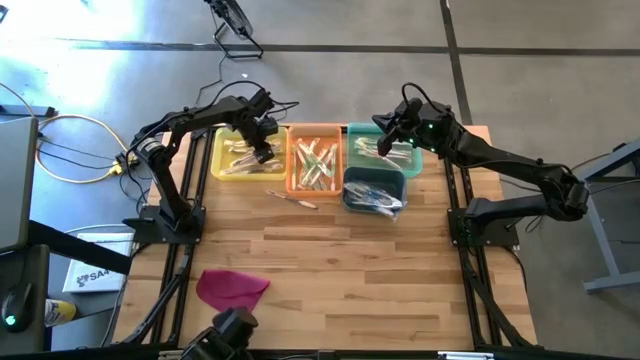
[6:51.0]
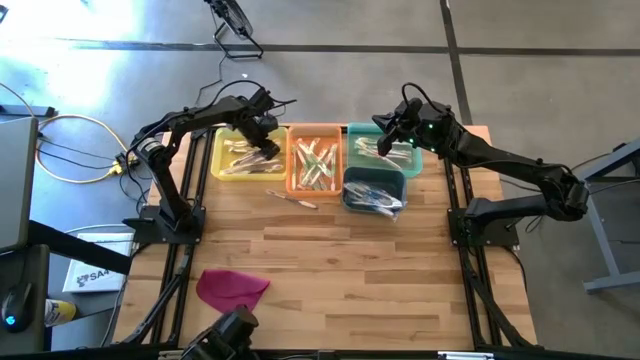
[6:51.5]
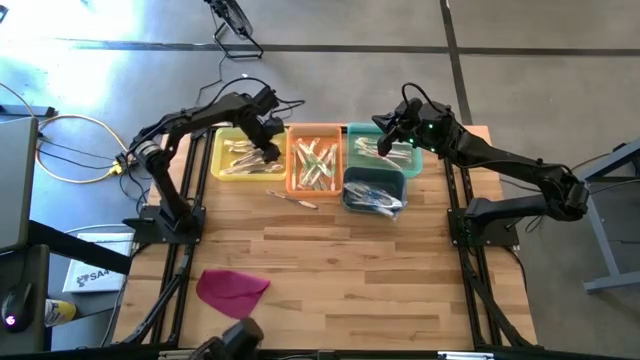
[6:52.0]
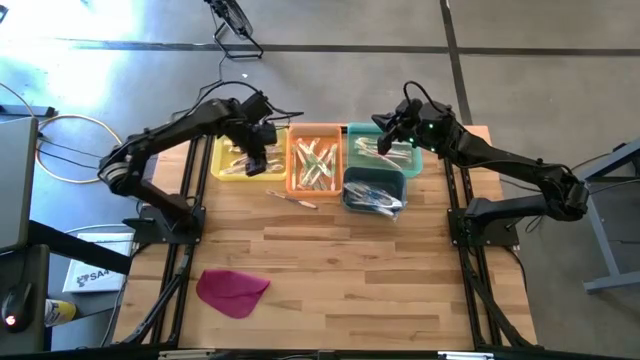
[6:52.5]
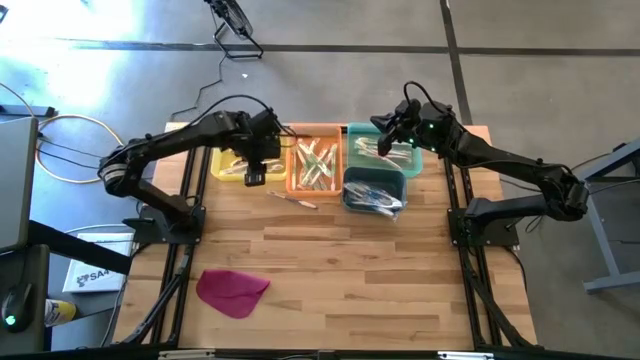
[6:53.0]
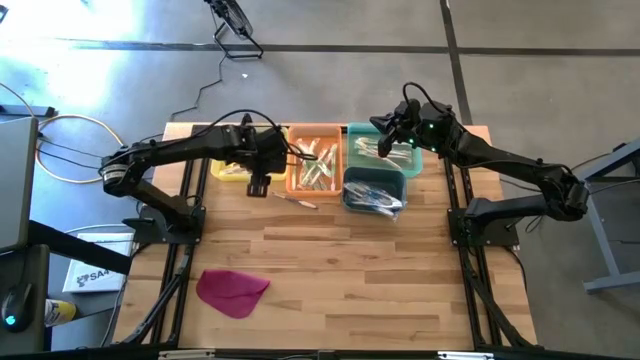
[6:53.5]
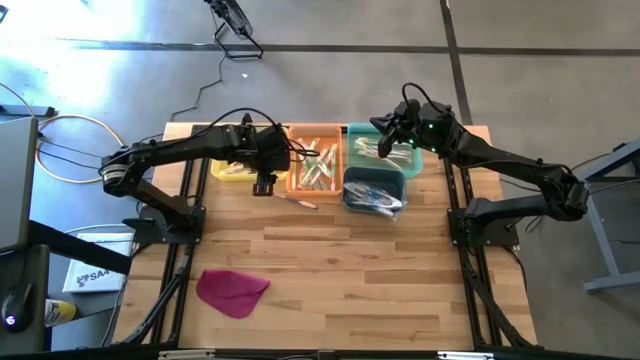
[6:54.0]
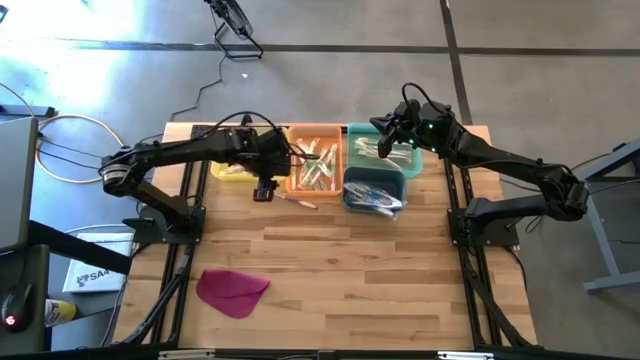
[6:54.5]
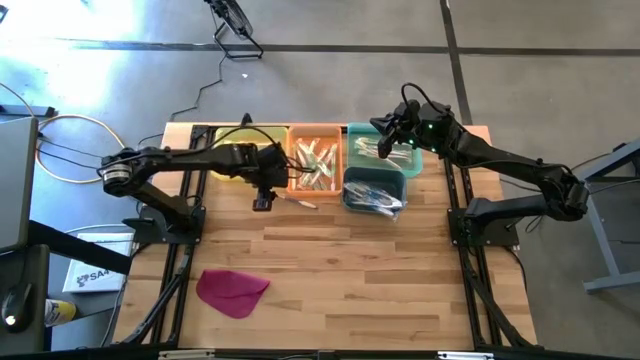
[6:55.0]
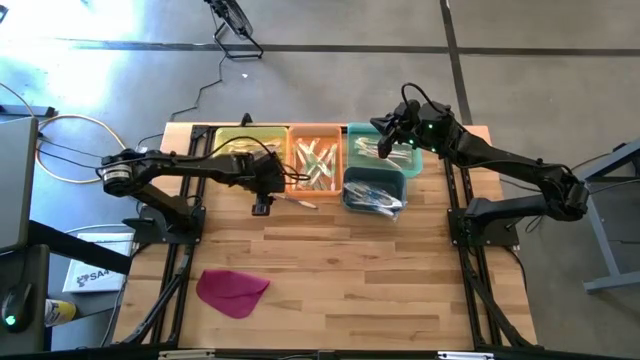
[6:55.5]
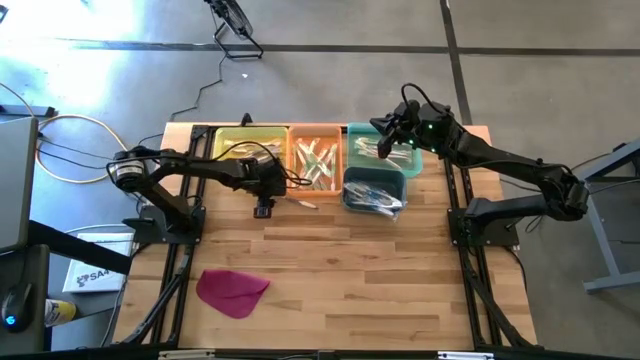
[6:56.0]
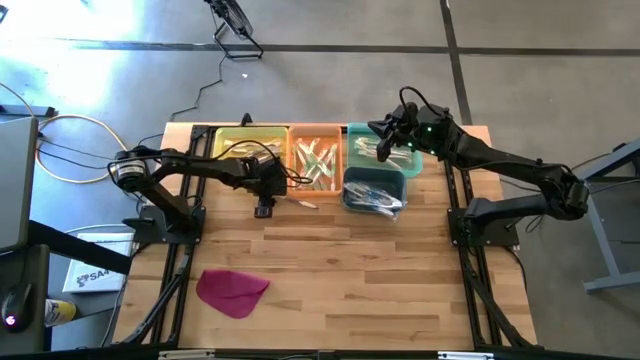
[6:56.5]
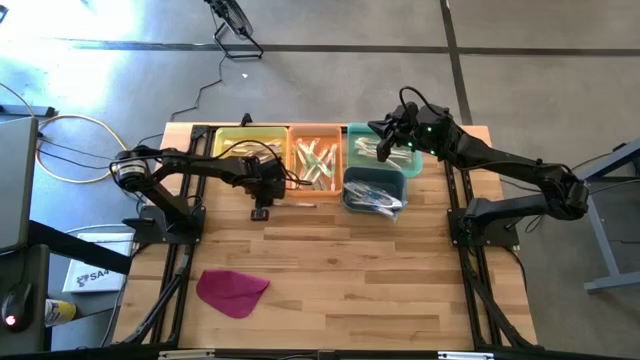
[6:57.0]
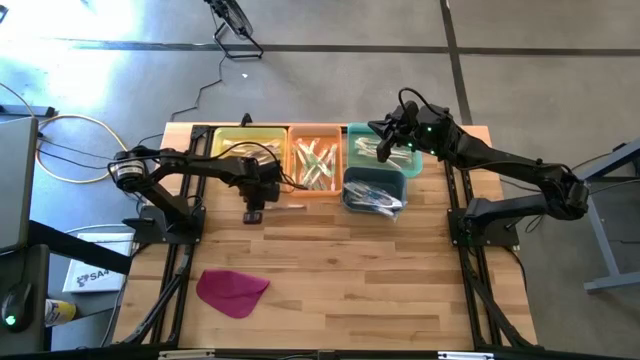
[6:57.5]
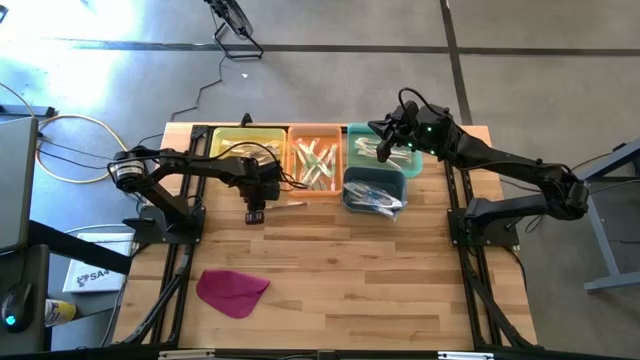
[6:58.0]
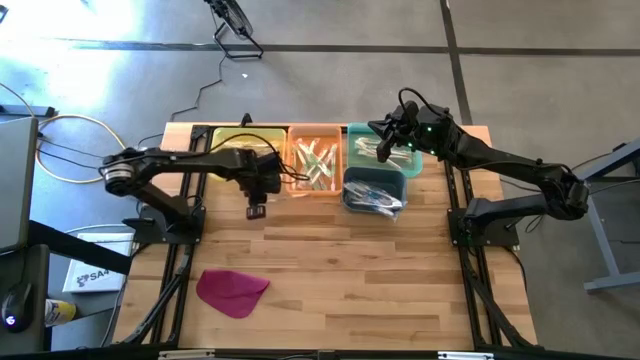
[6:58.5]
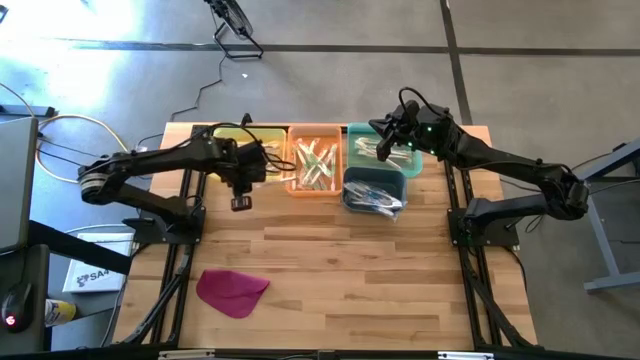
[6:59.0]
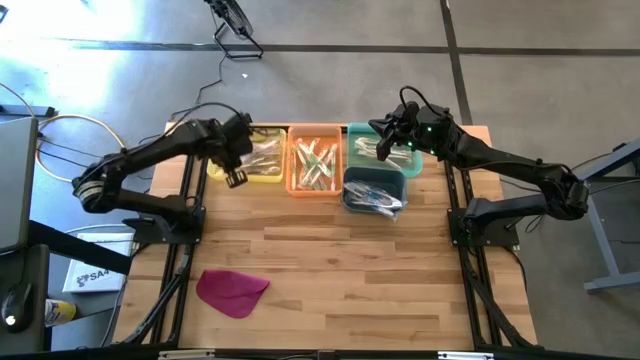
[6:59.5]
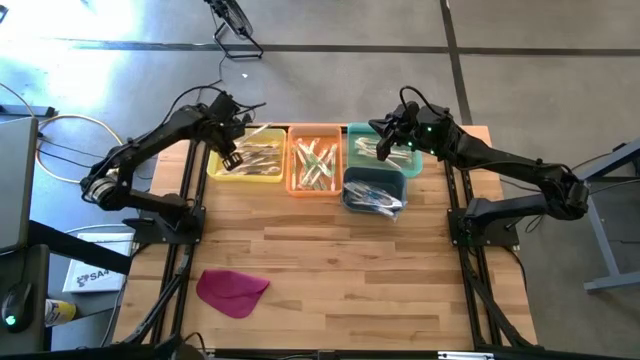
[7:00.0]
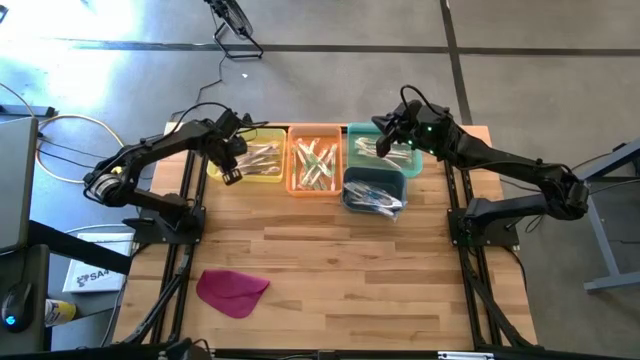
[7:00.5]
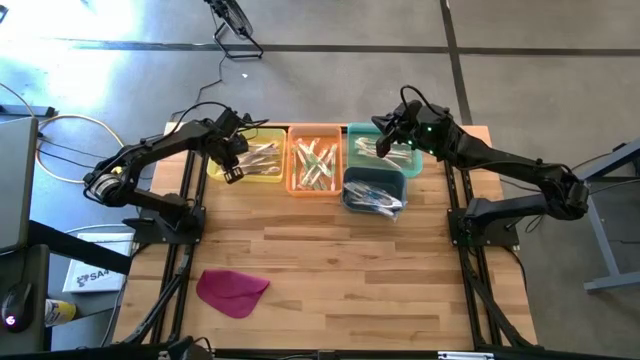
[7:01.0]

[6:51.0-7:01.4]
Task: Pick & Place Toothbrushes
Put the violet toothbrush into the yellow bin

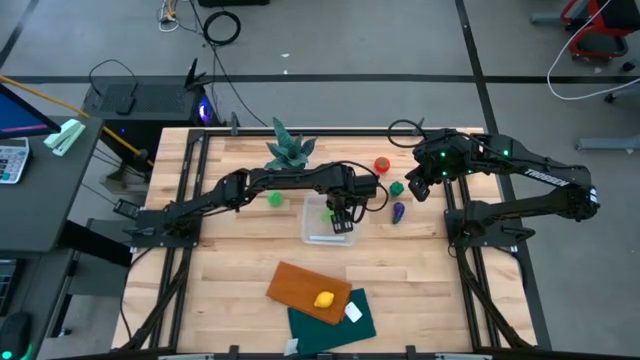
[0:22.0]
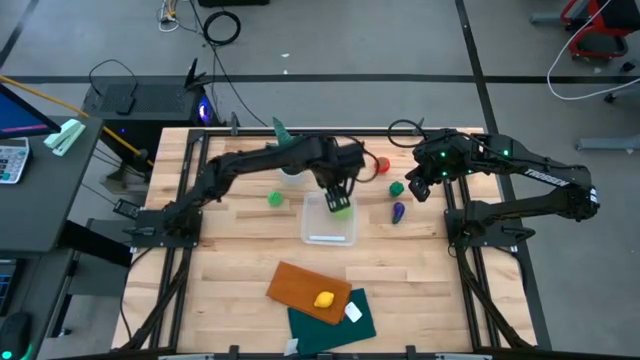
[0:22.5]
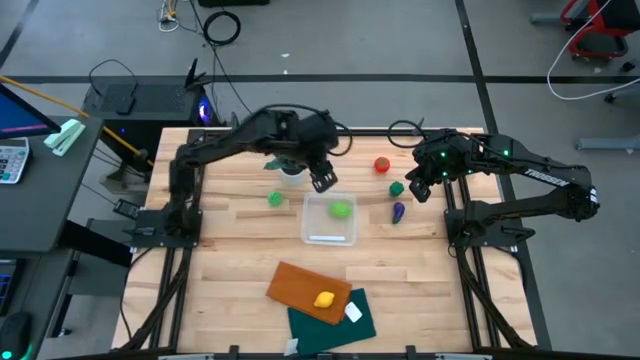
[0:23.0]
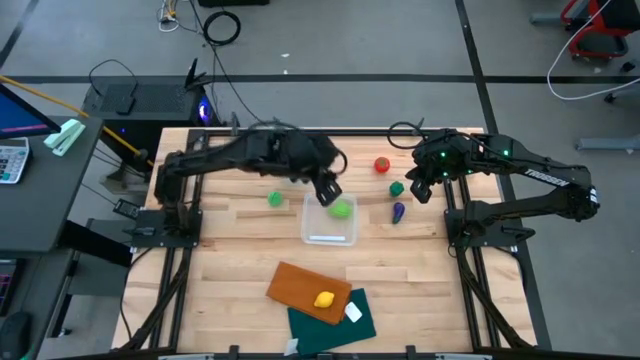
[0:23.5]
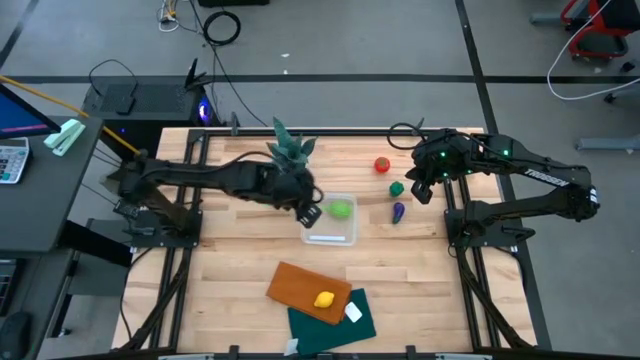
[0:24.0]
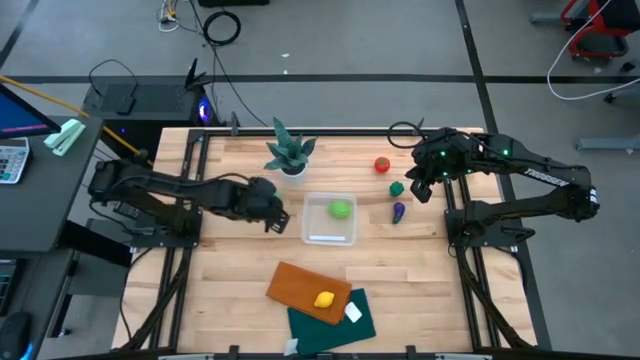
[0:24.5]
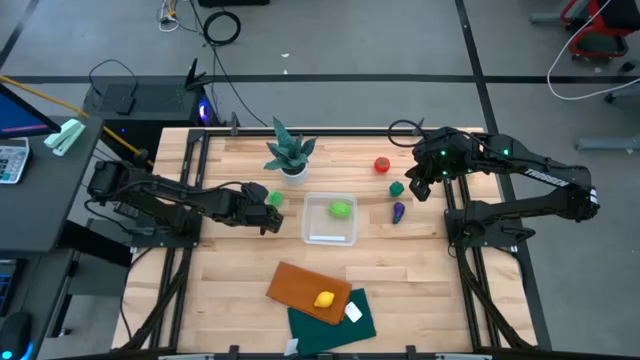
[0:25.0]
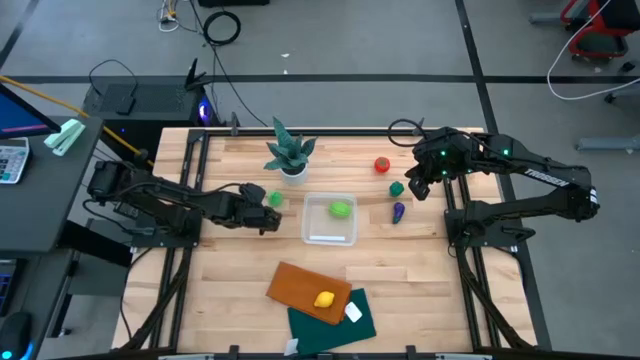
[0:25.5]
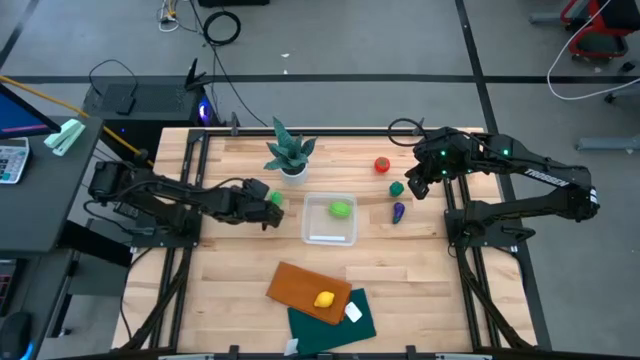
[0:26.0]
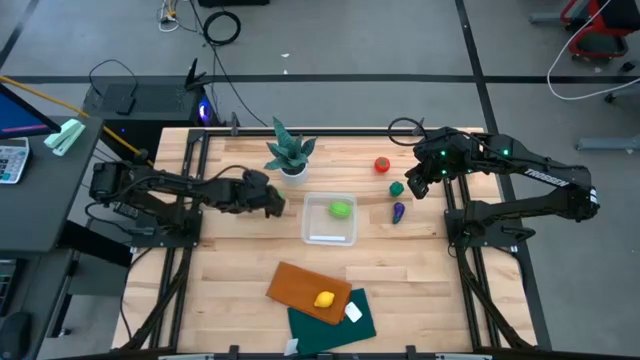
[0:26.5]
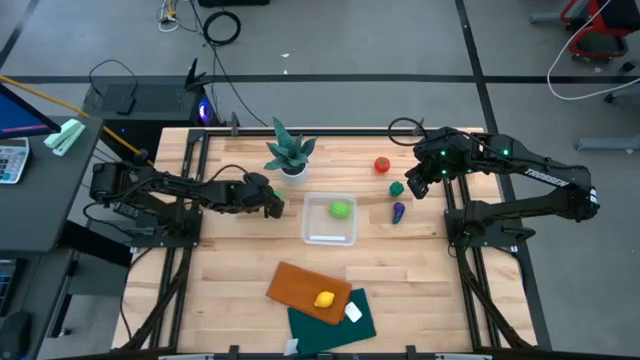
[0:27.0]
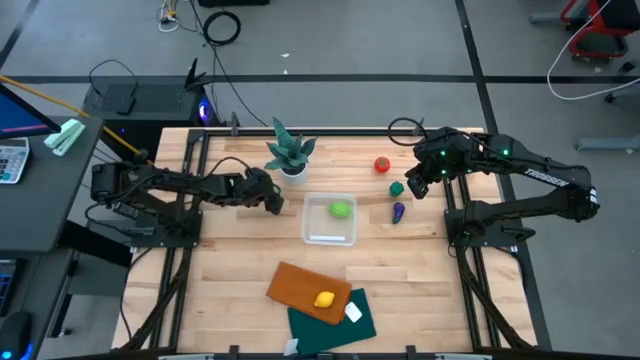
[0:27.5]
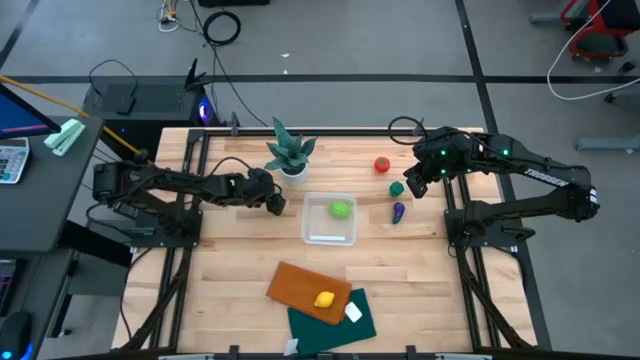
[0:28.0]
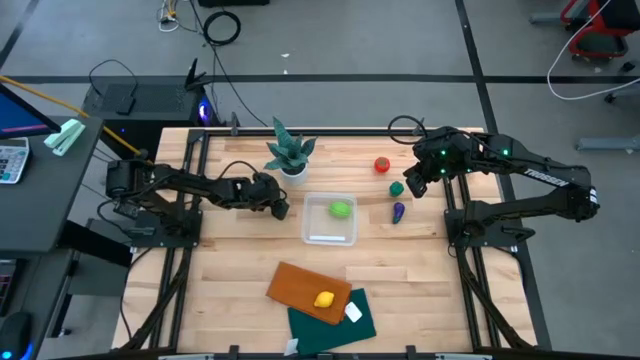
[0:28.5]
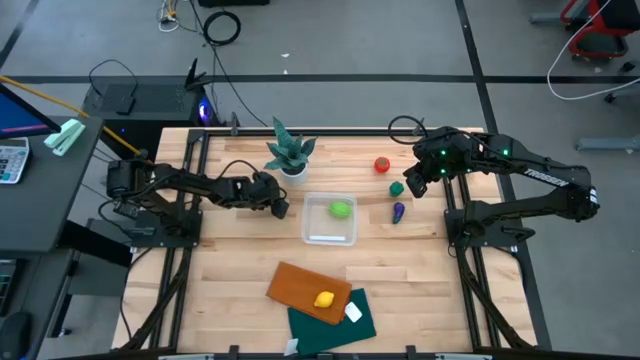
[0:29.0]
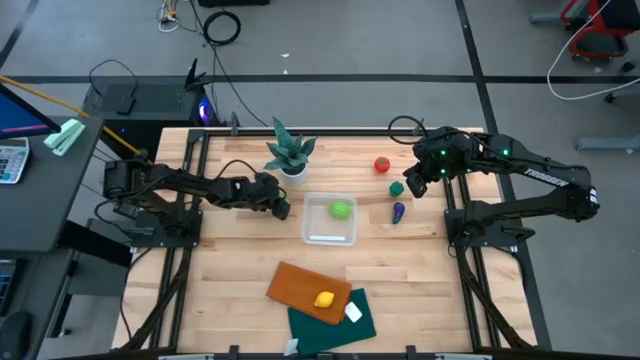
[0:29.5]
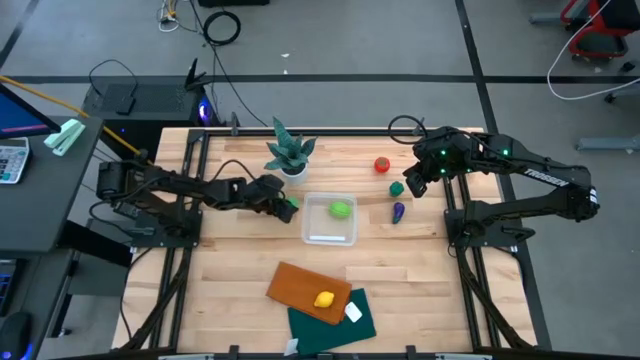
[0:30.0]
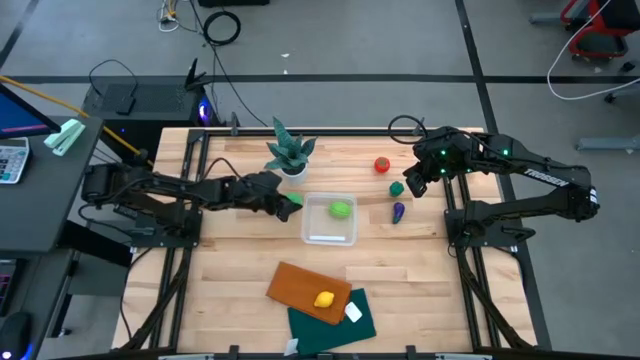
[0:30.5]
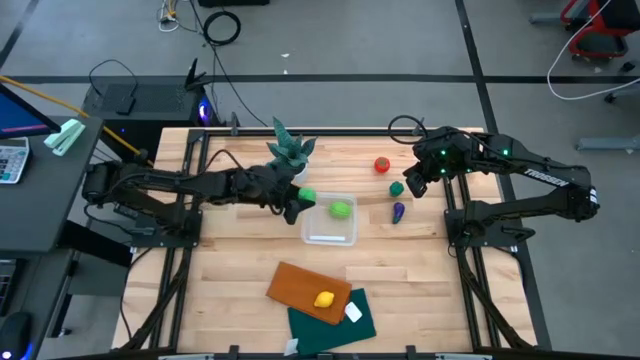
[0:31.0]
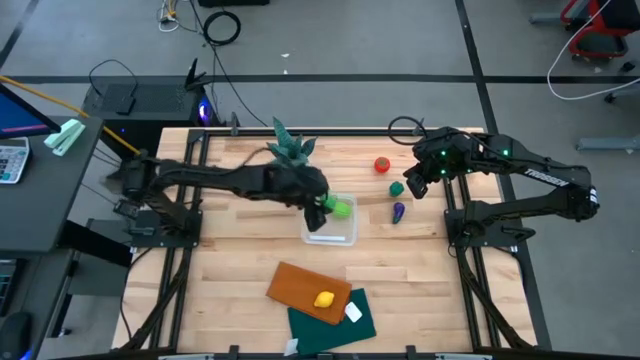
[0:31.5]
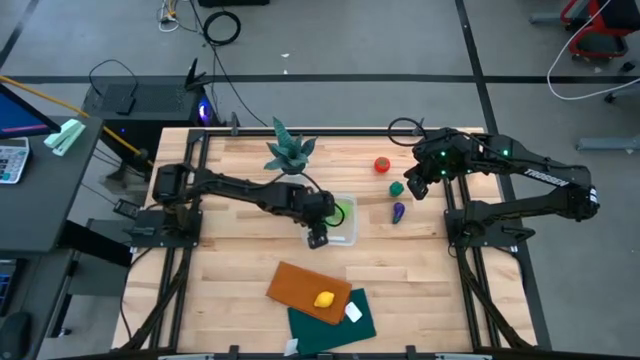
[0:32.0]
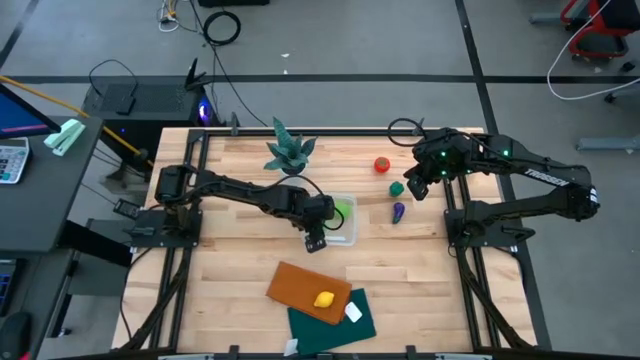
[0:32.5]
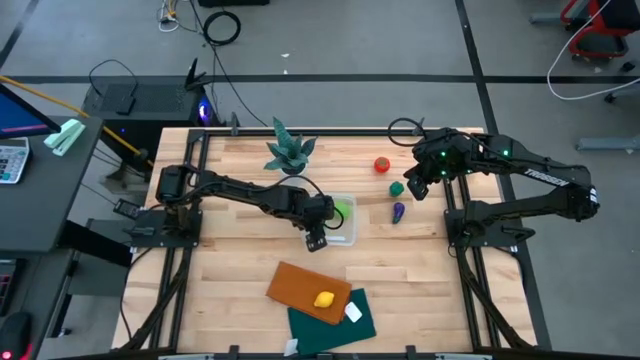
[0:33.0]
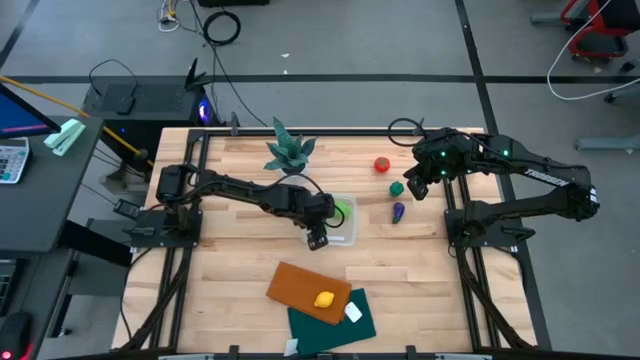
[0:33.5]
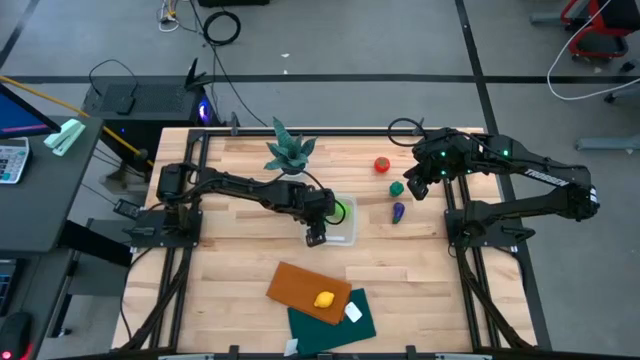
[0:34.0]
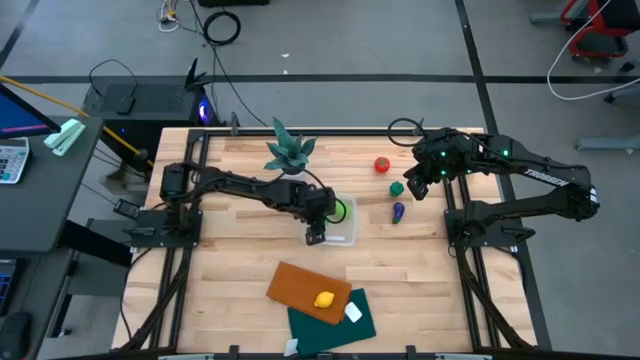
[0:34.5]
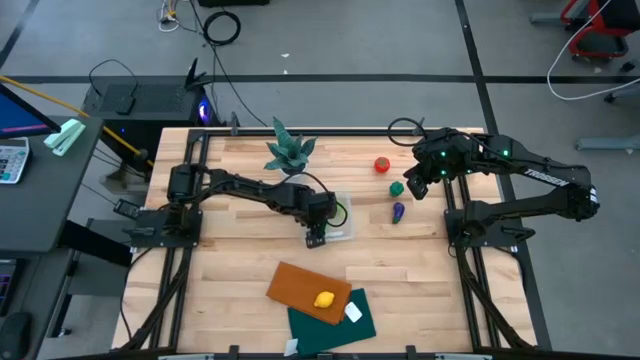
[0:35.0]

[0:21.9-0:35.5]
Task: Pick and placing Produce into tupperware
Put the pear into the transparent bin
